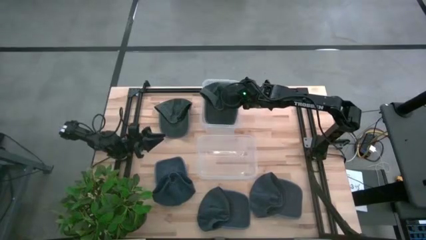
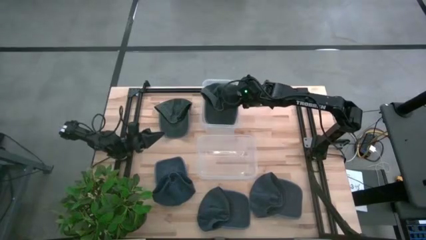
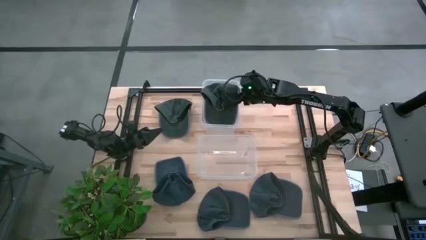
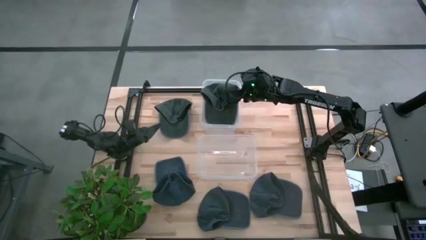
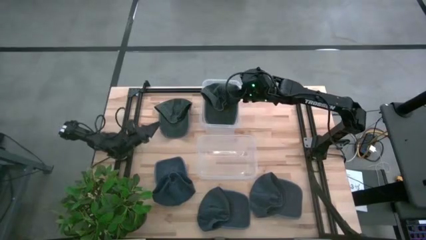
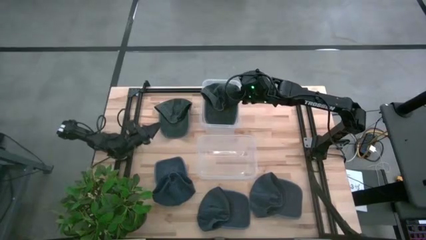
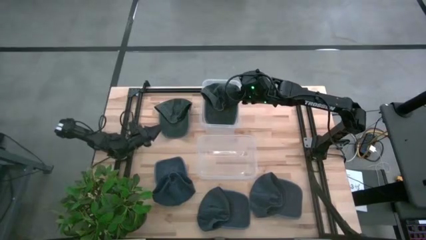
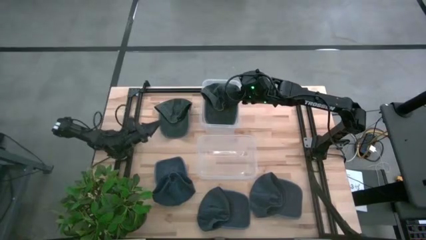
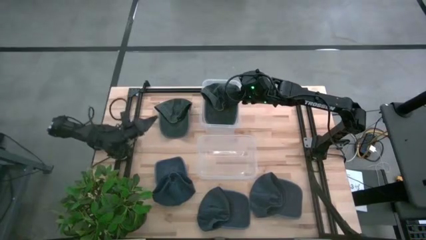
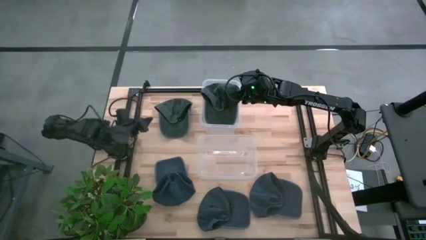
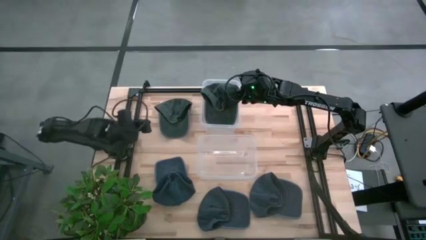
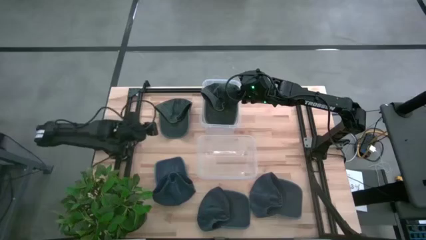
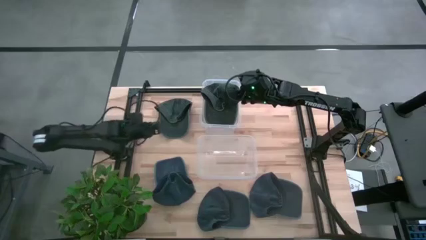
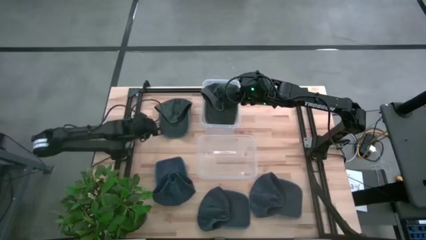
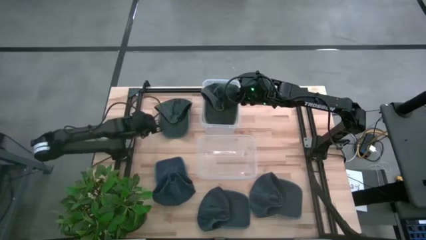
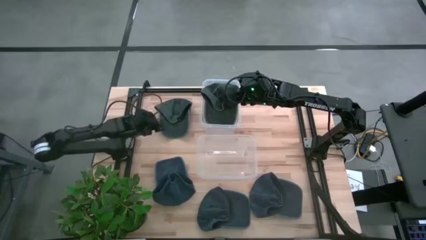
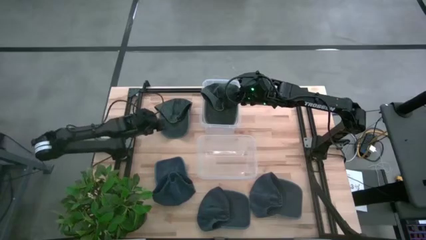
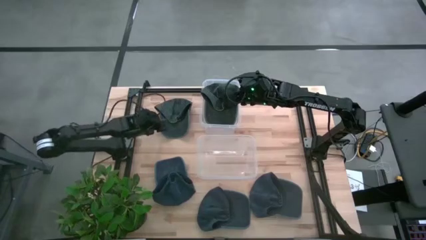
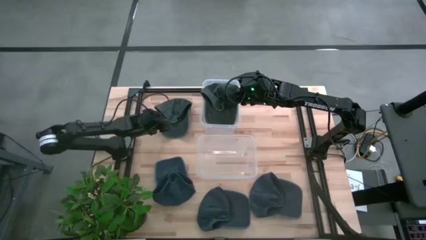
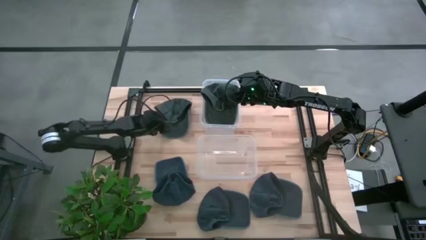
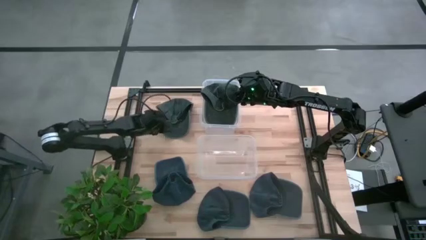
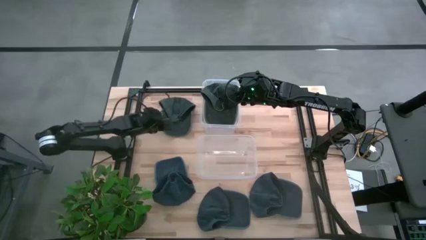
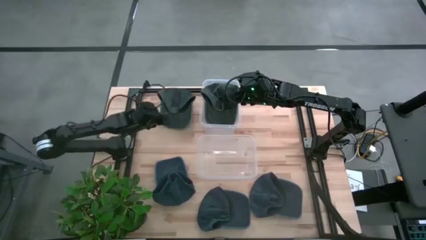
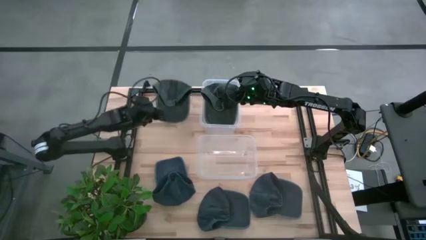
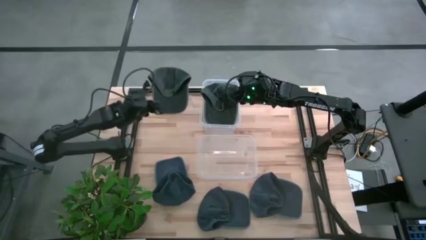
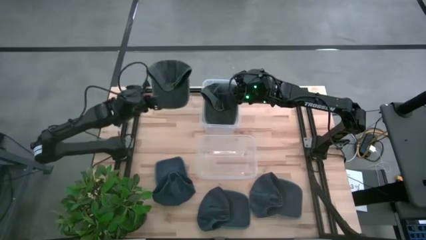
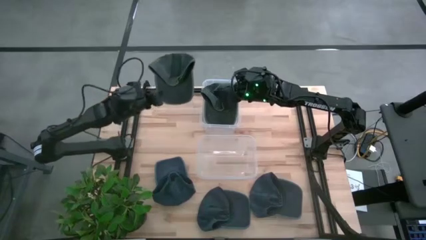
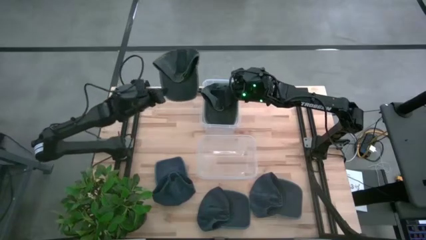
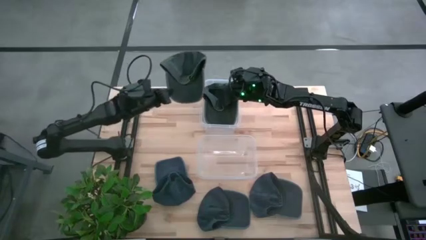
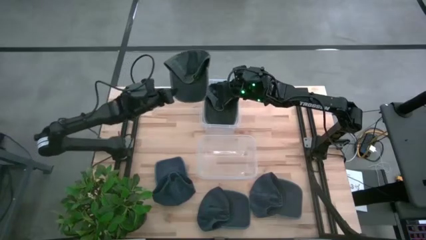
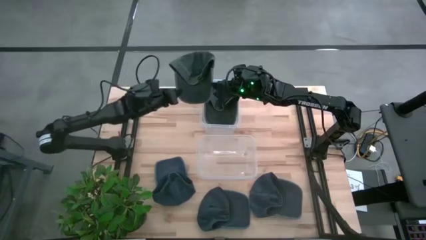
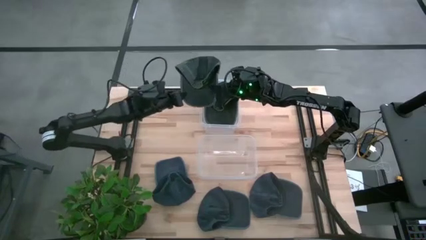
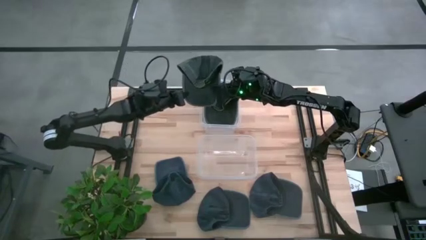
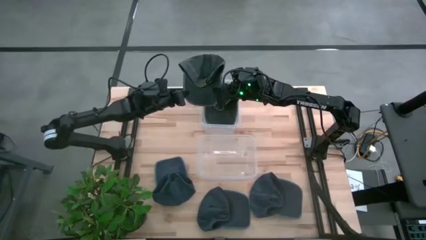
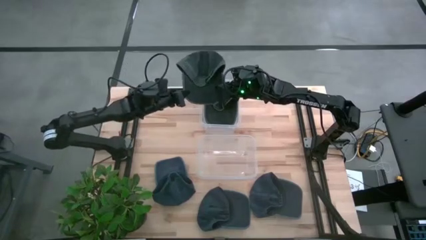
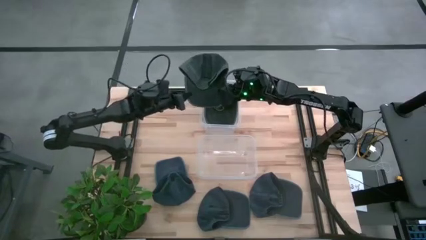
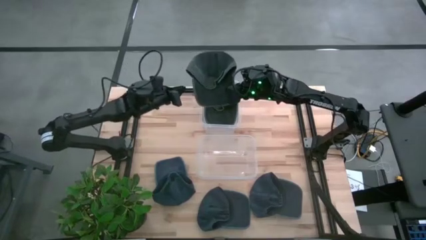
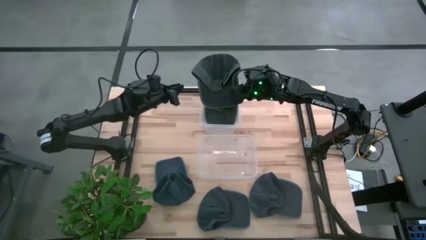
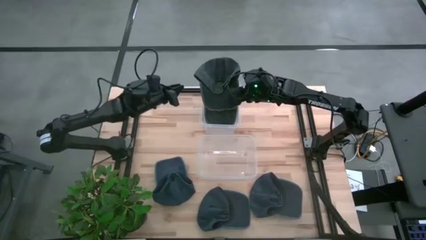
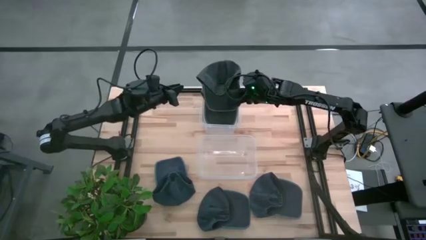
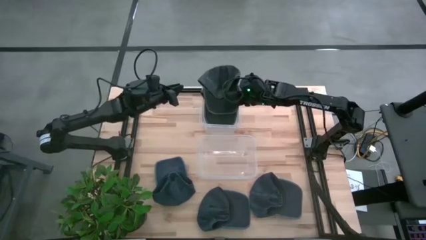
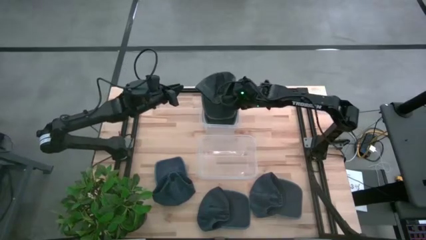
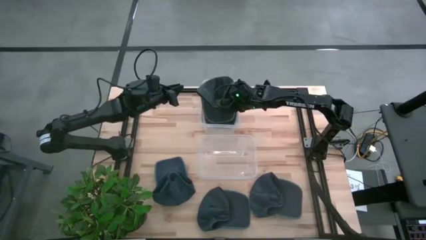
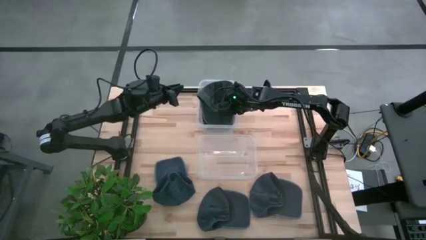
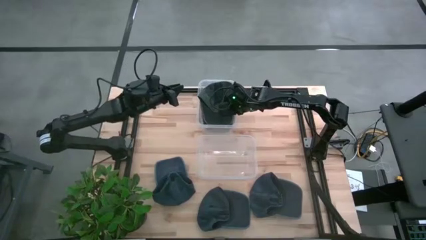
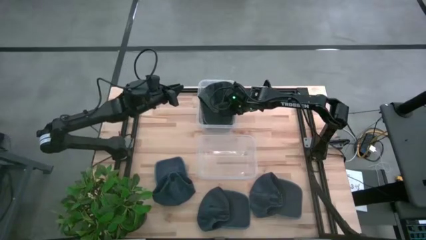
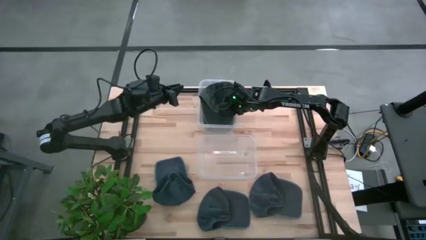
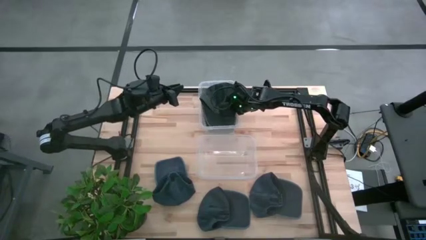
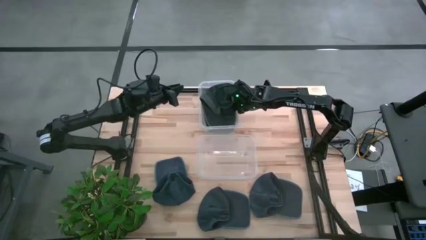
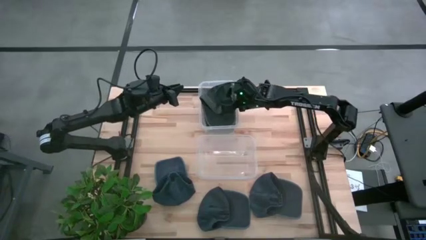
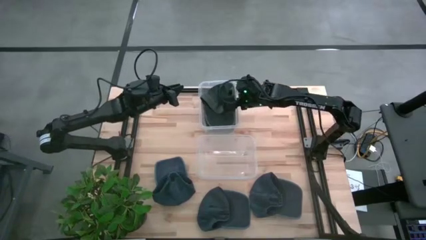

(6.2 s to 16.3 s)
Task: Pick & Place hat
Put the gray cap into the top transparent bin

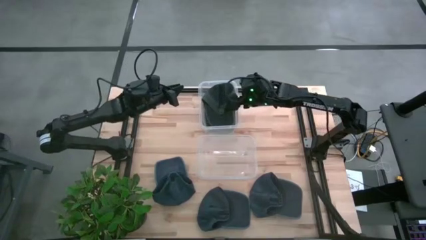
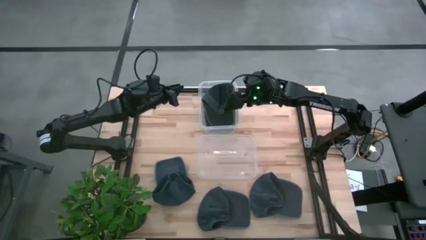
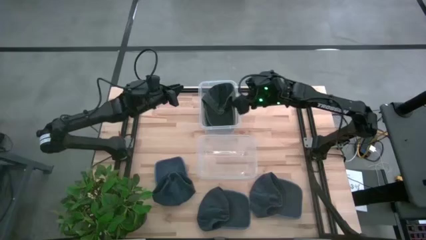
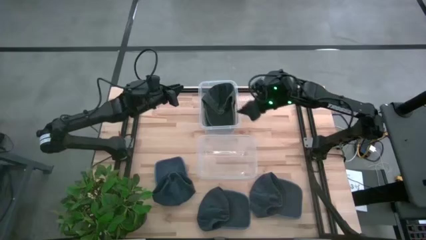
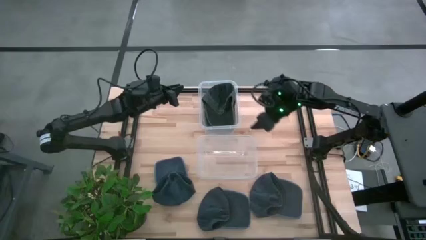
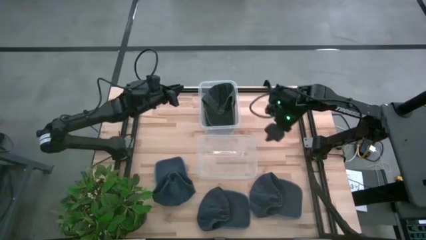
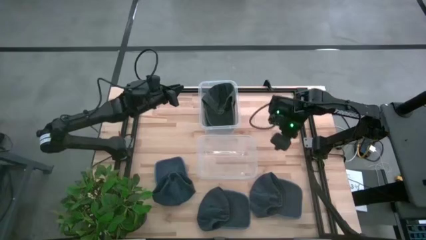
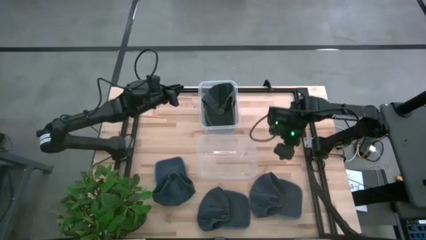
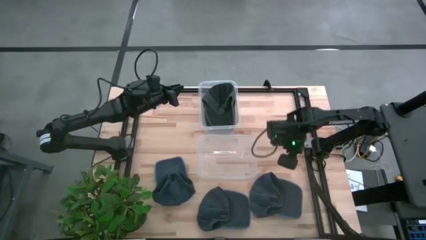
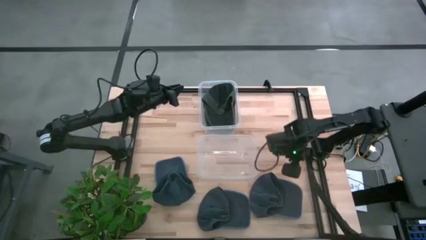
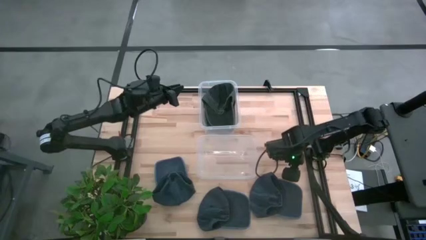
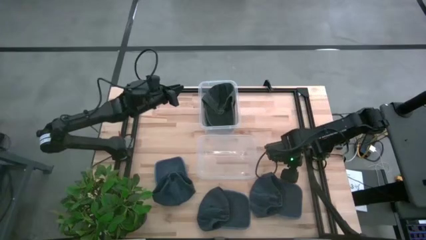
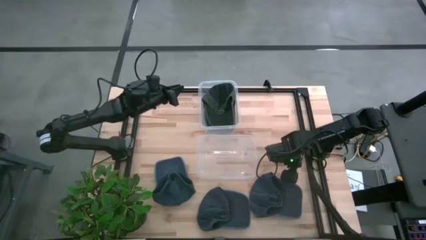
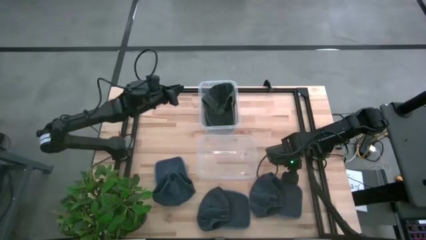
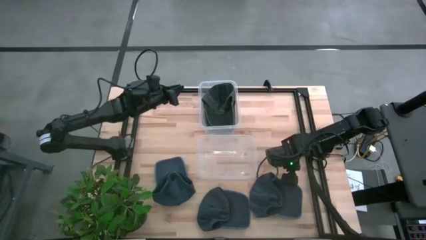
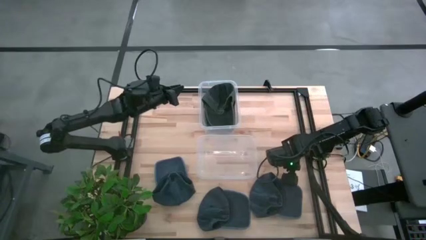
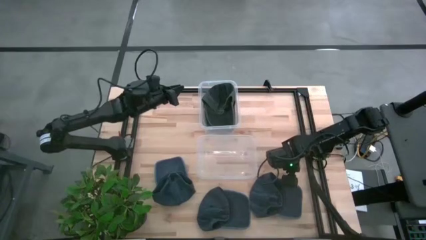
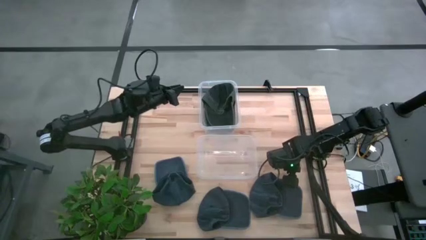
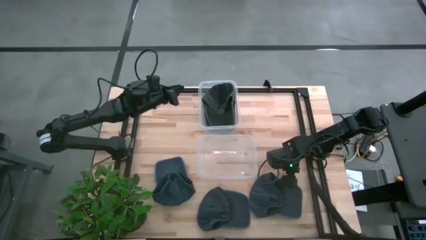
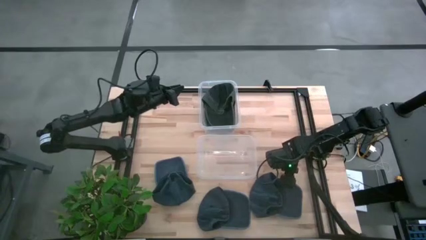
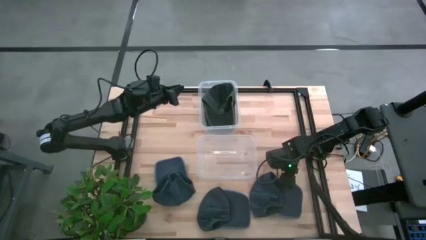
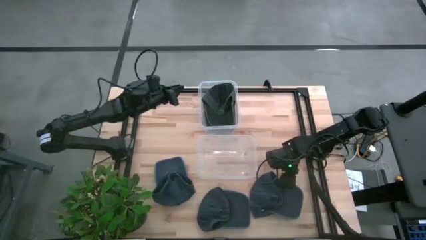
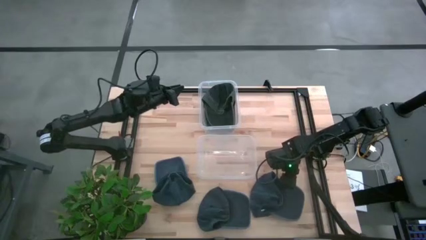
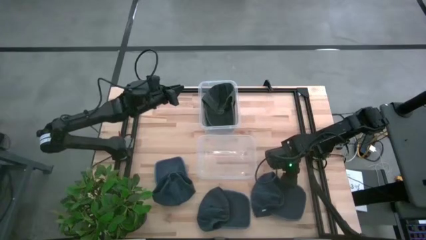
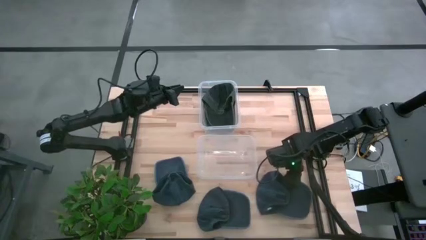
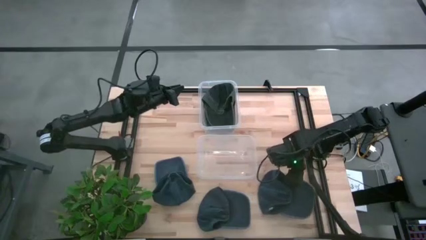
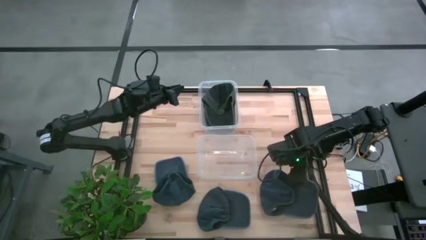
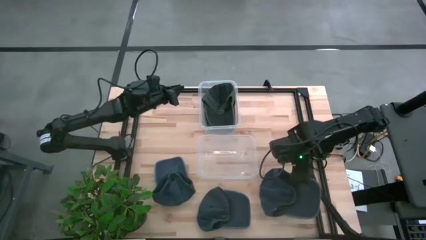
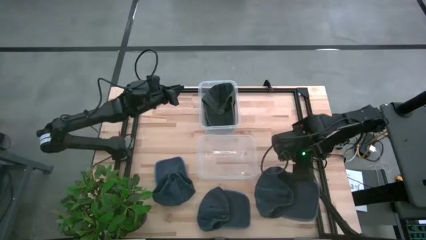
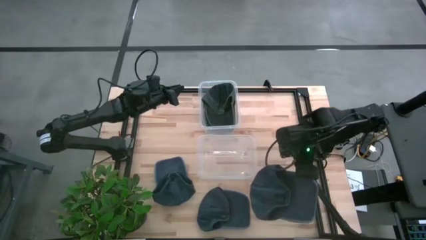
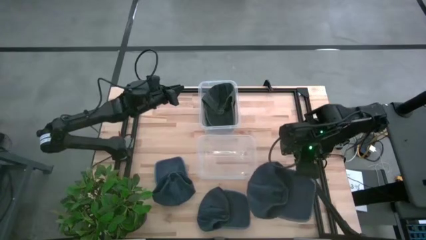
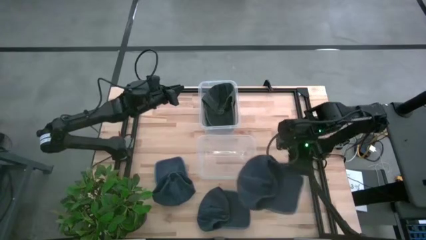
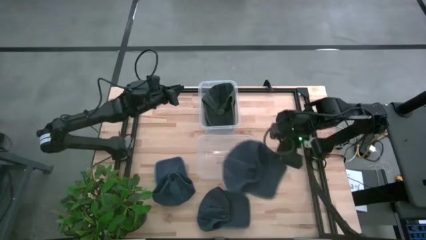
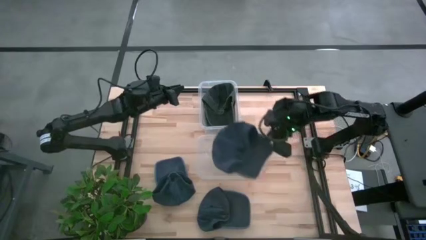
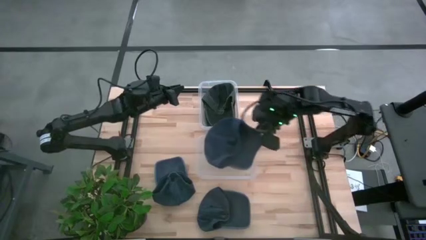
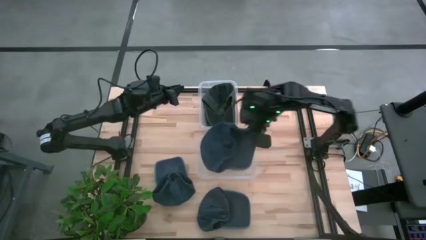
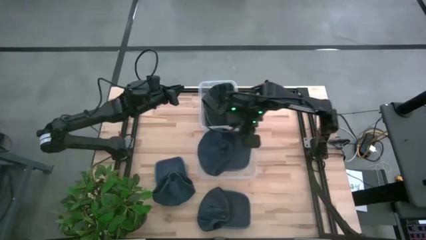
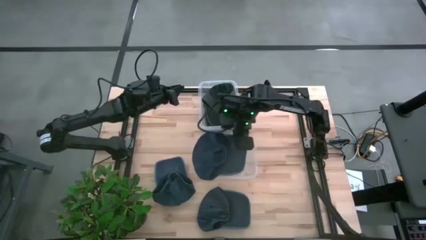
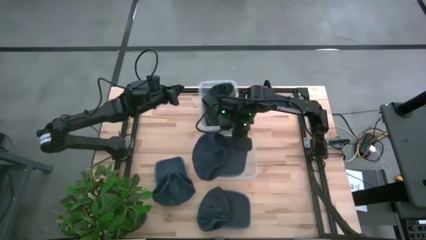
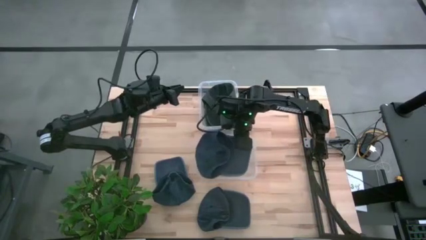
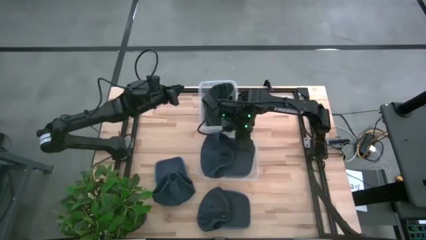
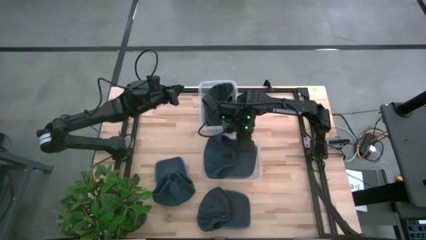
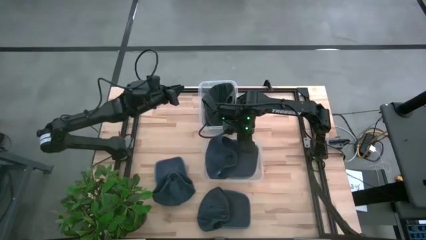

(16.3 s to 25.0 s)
Put the bottom right blue cap into the bottom transparent bin
